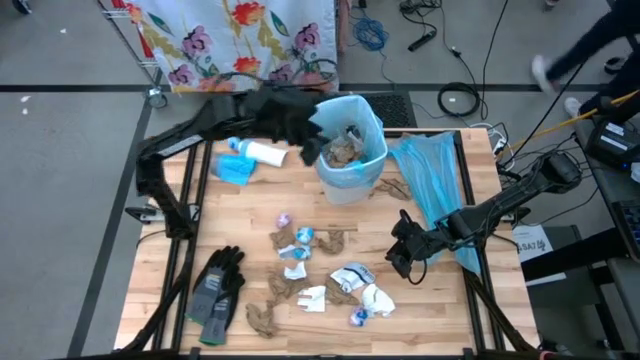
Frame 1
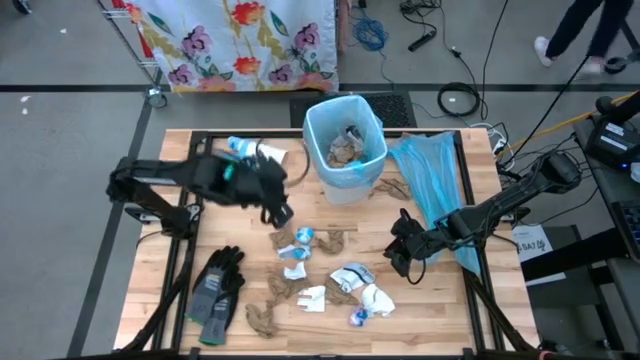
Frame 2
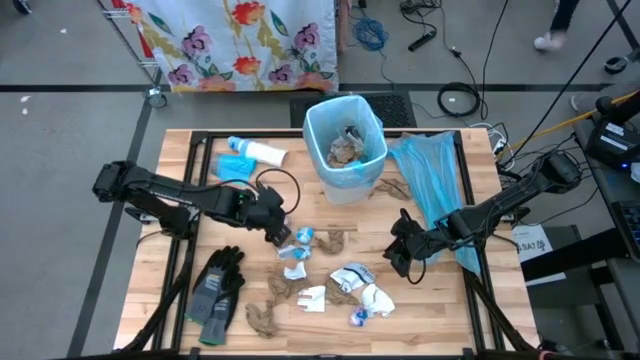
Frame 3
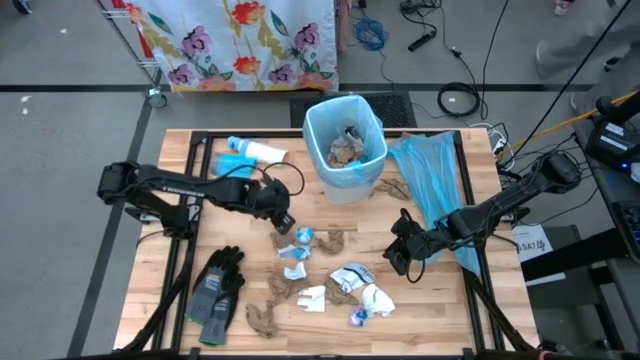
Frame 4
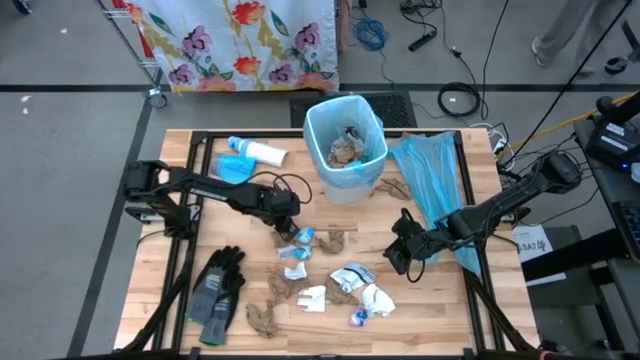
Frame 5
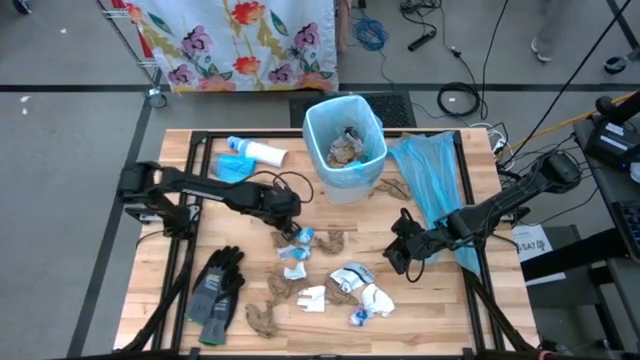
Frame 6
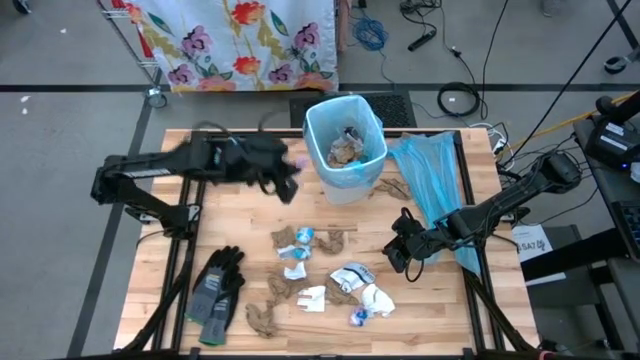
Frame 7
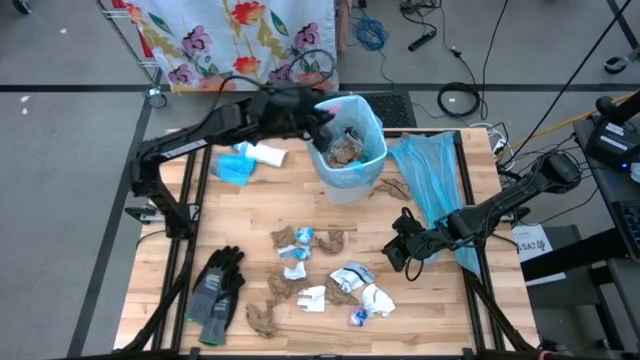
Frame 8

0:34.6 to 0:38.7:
Task: place trash/remove bag and relplace
Put the pink trashbag into the trash bin

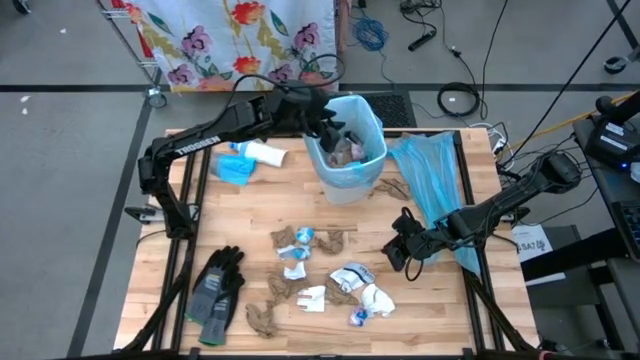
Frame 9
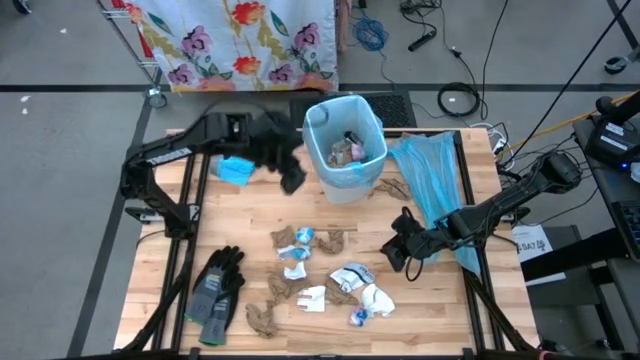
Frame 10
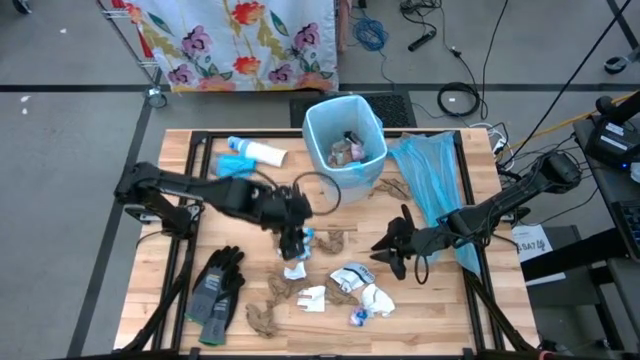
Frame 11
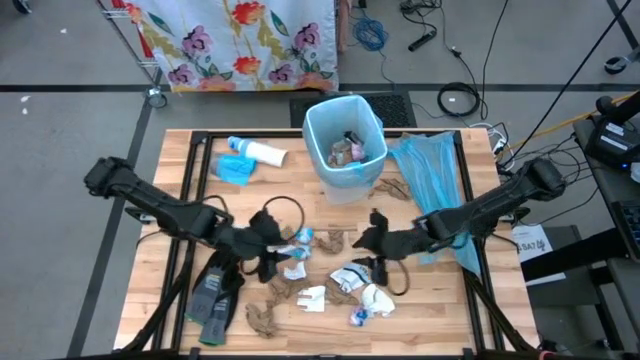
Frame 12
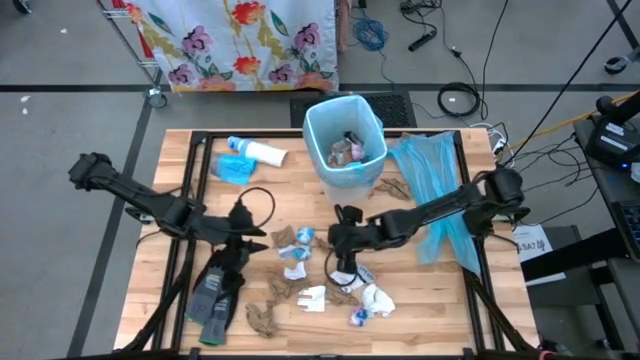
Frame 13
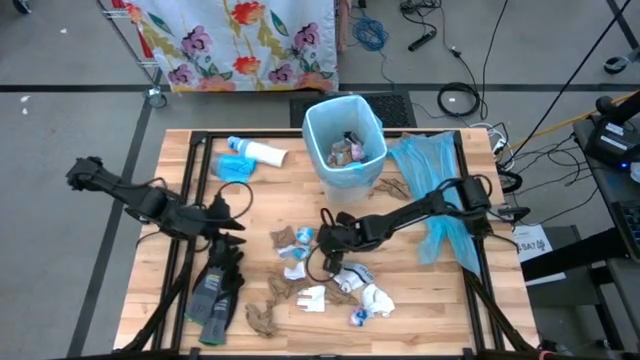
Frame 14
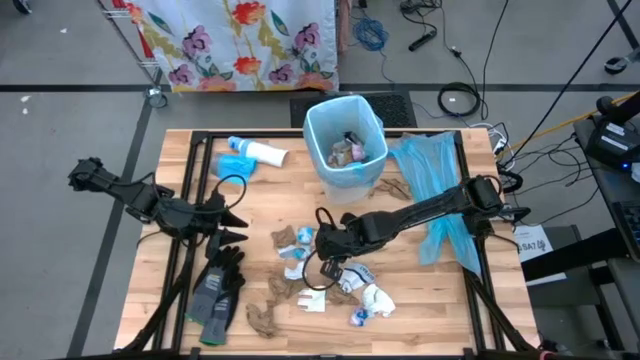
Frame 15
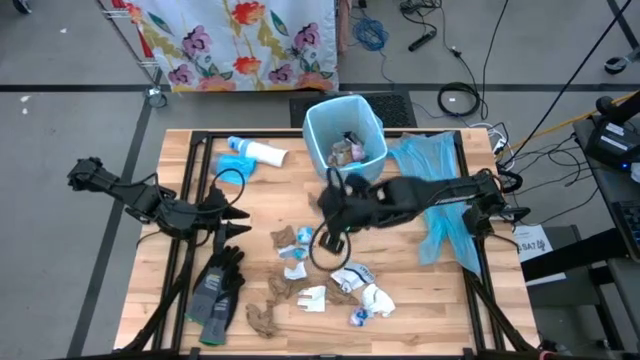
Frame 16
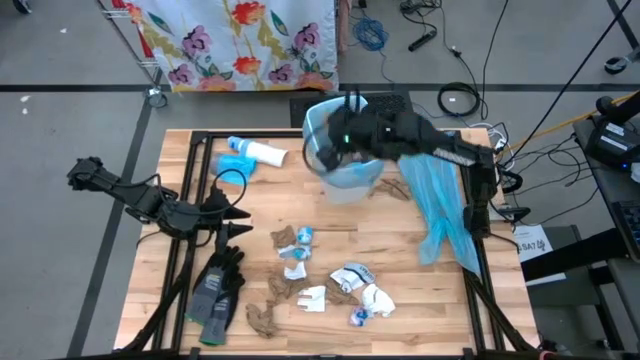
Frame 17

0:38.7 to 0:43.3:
Put the brown paper into the trash bin

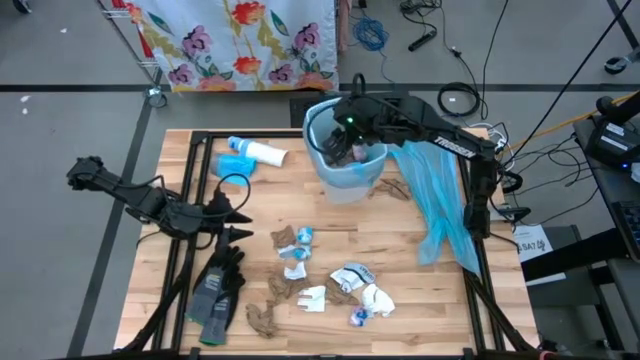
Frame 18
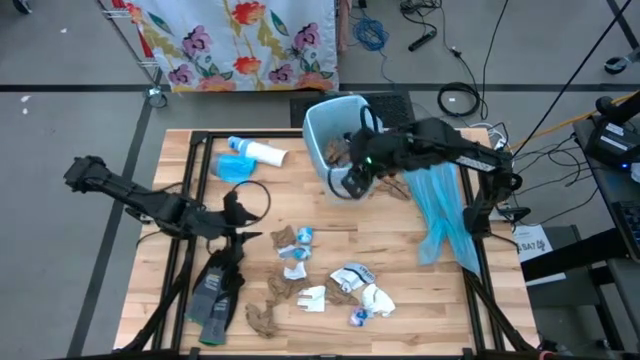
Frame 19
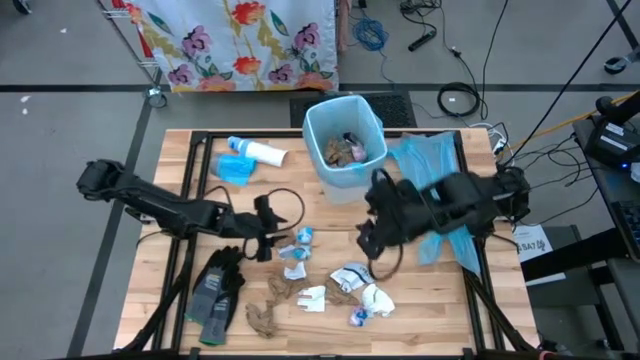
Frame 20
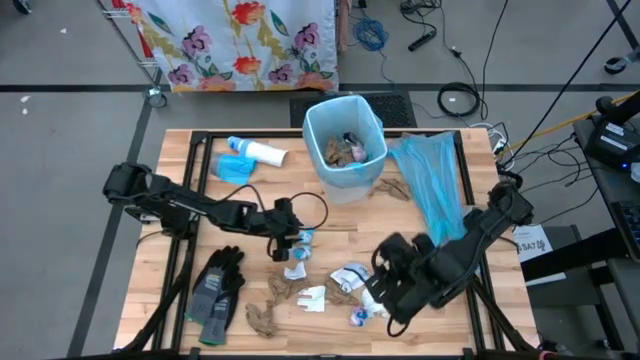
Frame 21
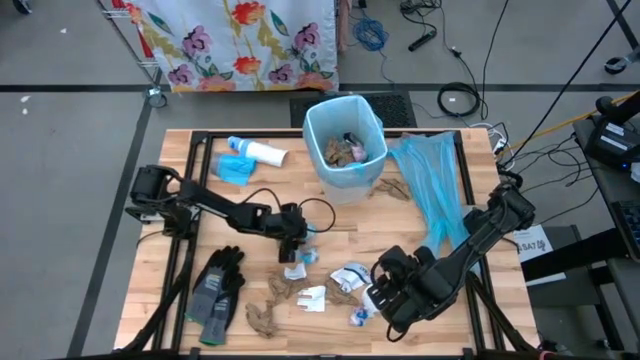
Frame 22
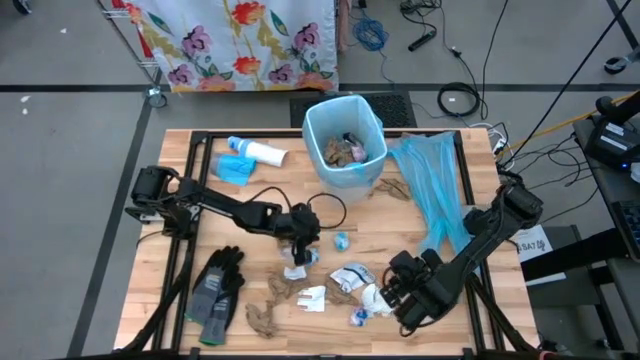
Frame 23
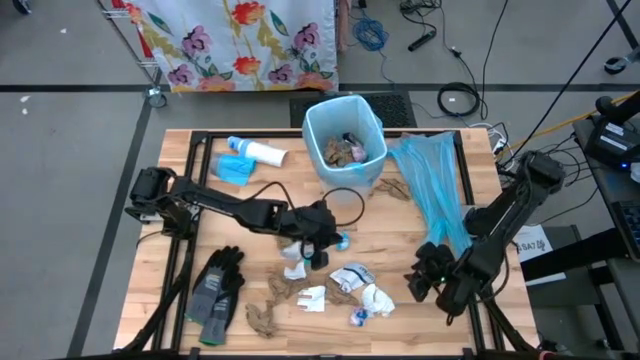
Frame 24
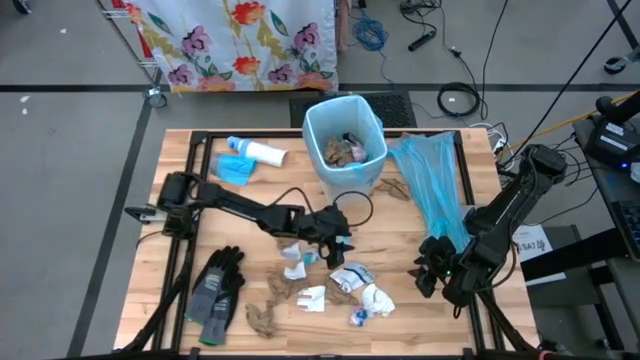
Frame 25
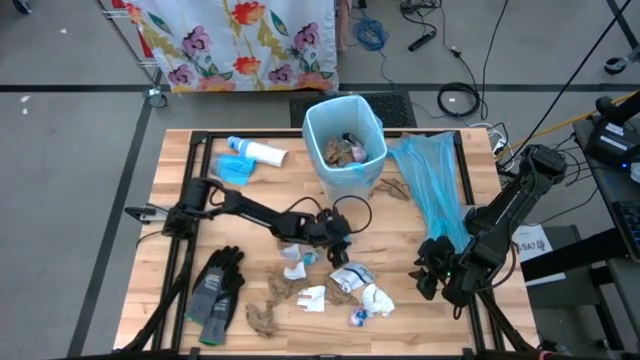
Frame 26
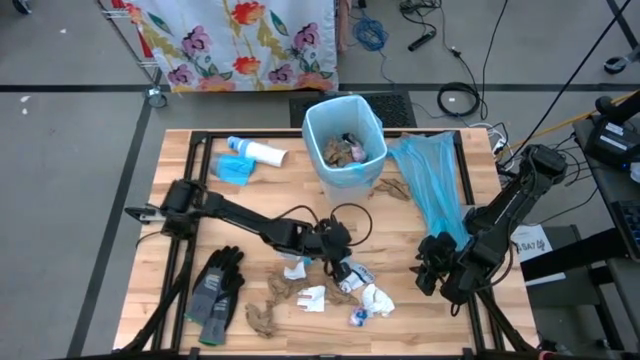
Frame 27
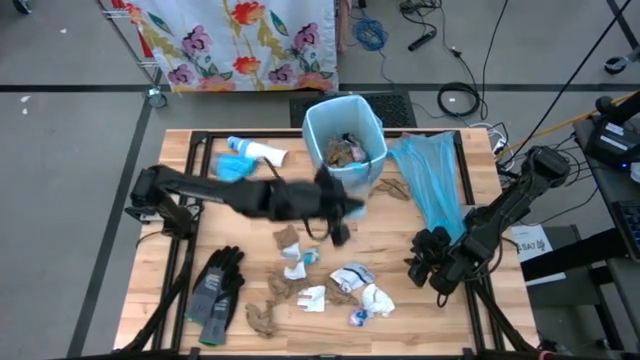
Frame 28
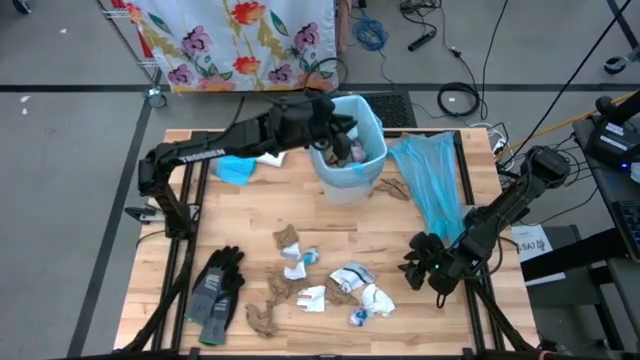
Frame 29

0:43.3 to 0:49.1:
Put the blue trashbag into the trash bin

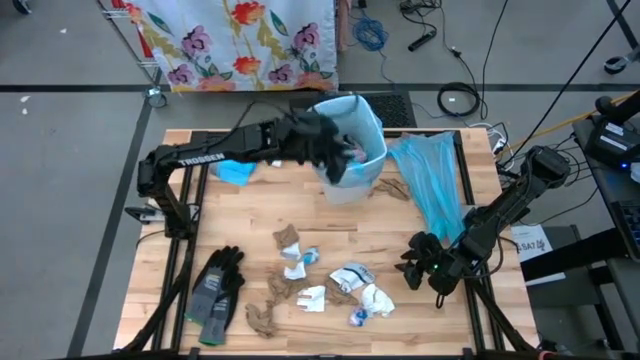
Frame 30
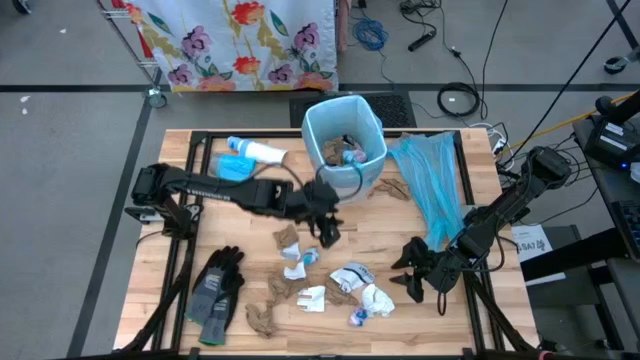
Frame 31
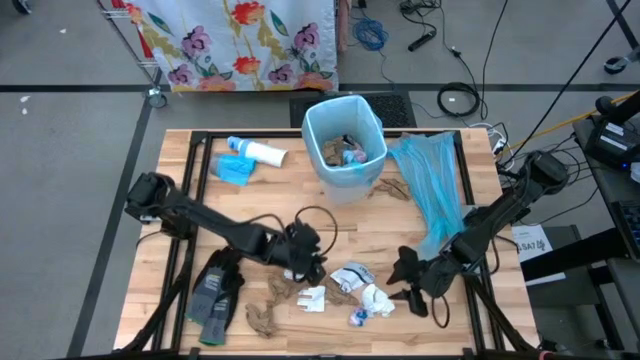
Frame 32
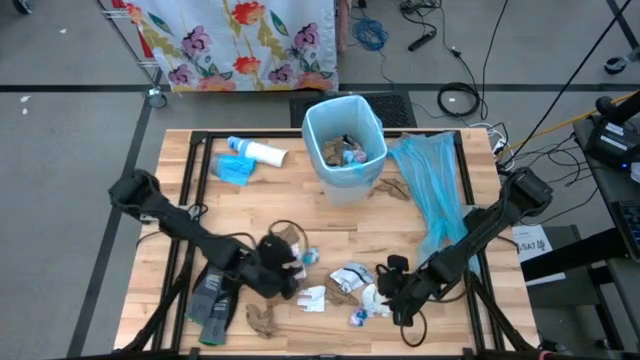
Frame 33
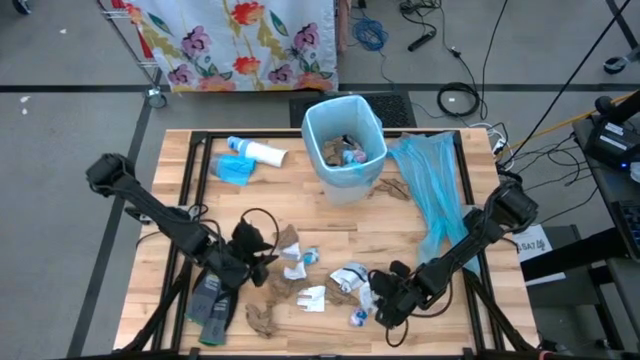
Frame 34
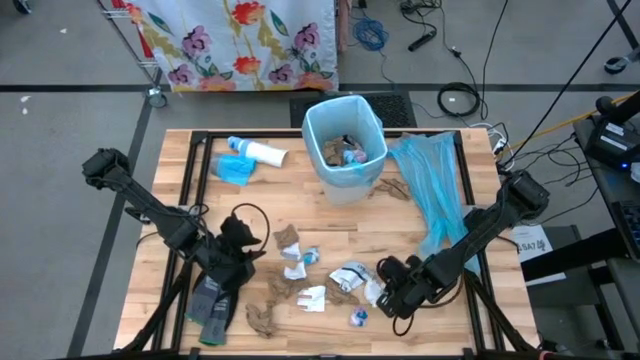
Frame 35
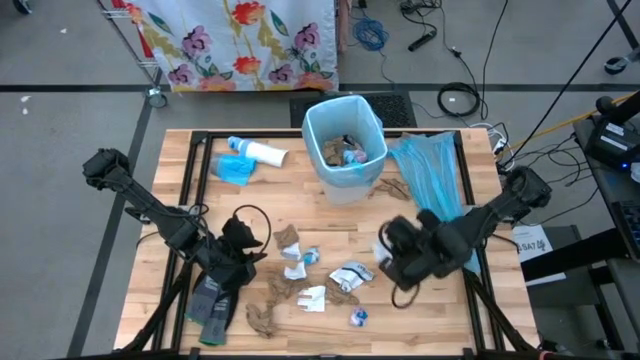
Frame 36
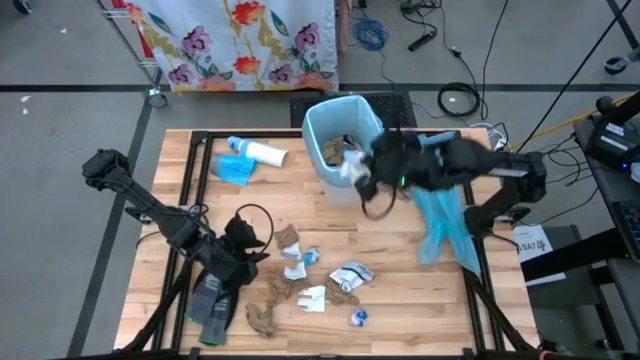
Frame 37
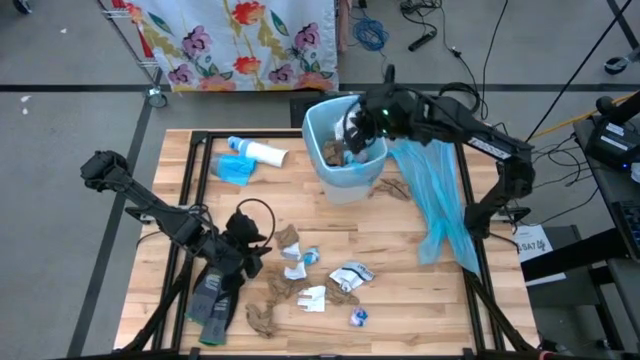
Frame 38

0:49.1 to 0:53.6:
Put the white paper into the trash bin

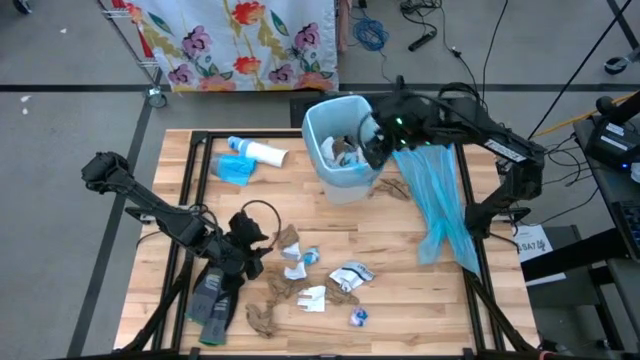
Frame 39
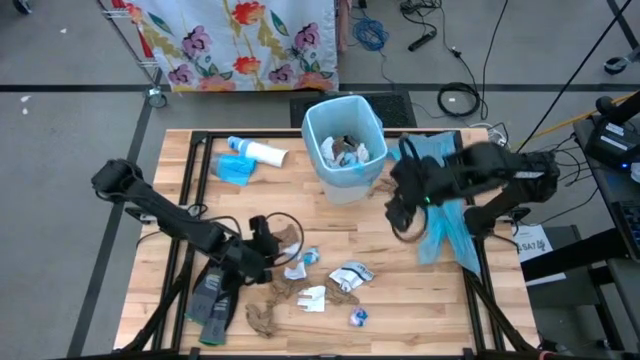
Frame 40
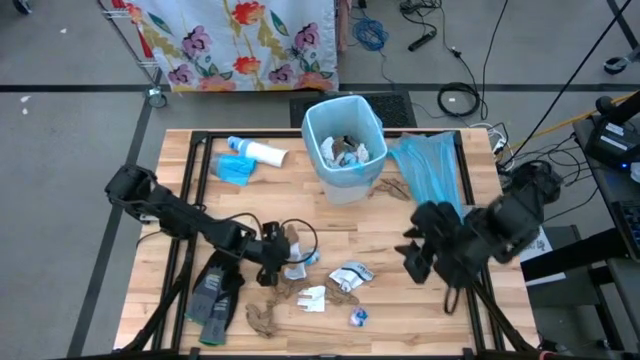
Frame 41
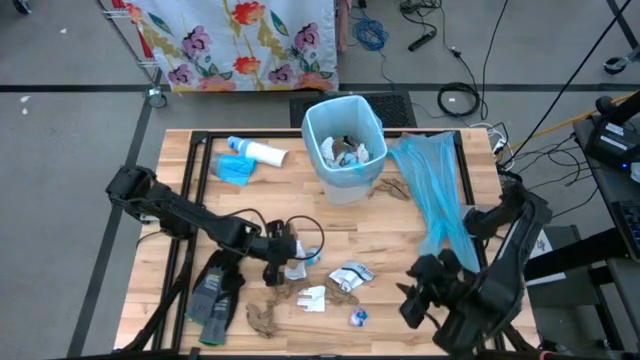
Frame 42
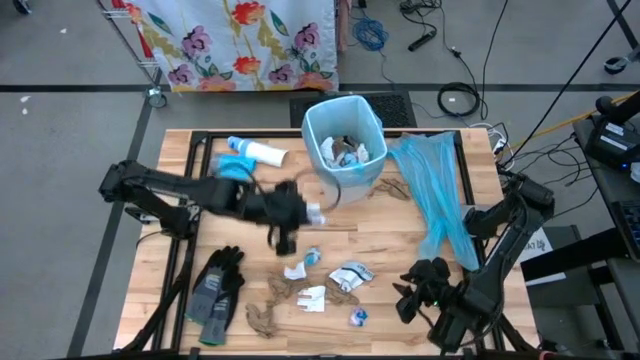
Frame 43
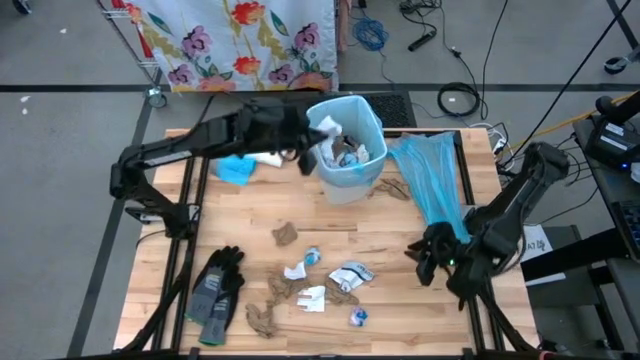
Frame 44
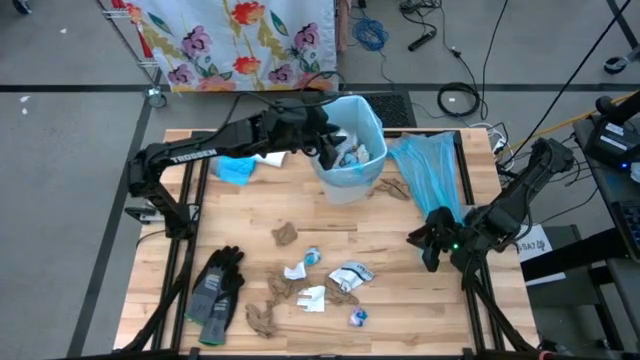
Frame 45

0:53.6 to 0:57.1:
Put the white paper into the trash bin
